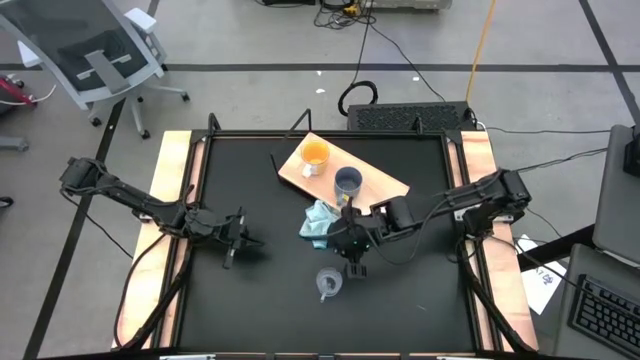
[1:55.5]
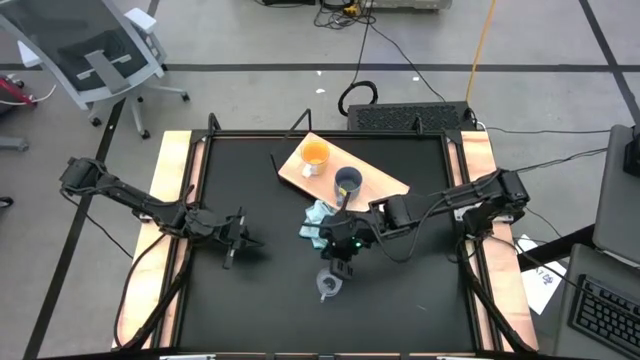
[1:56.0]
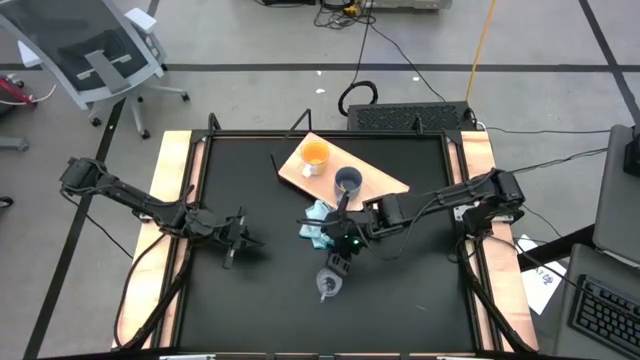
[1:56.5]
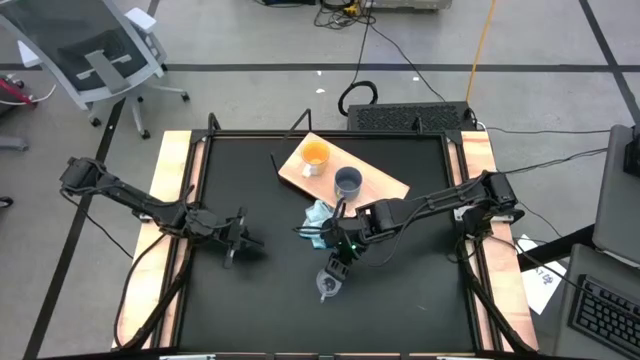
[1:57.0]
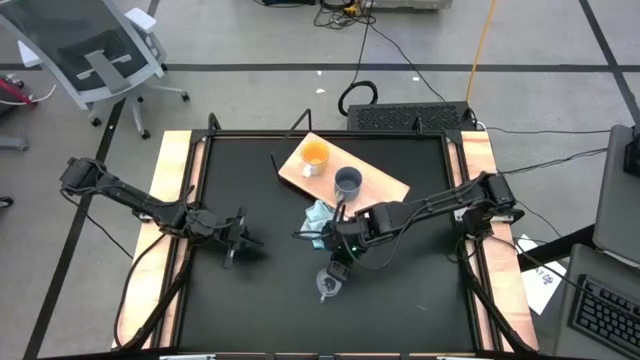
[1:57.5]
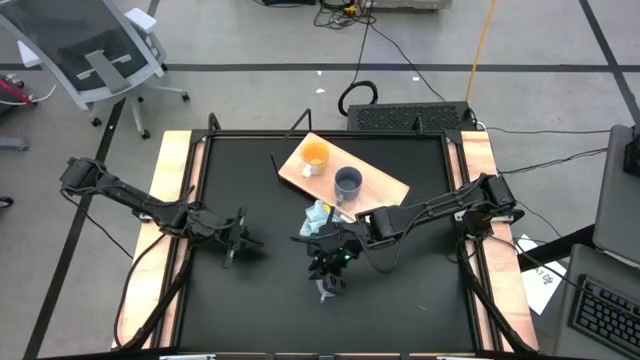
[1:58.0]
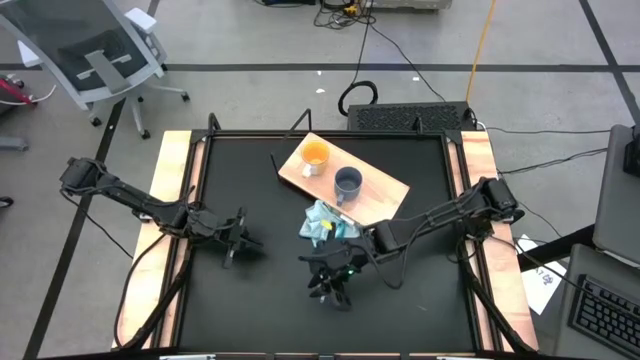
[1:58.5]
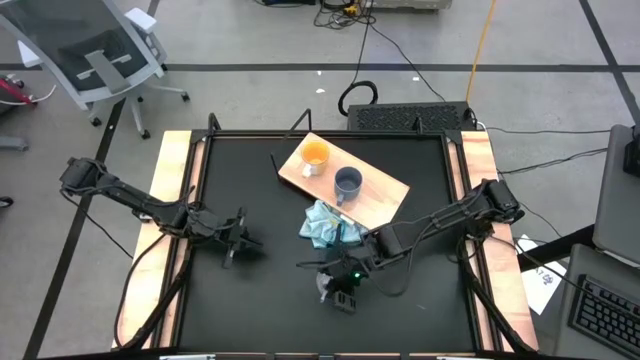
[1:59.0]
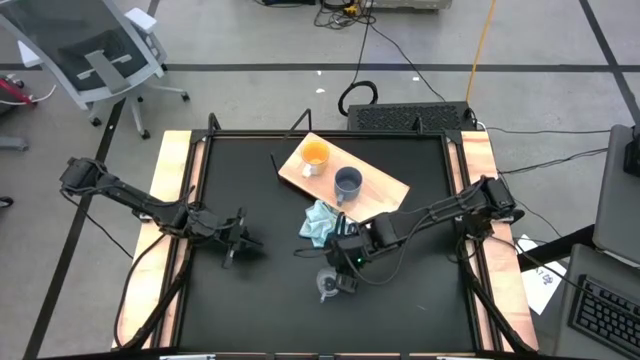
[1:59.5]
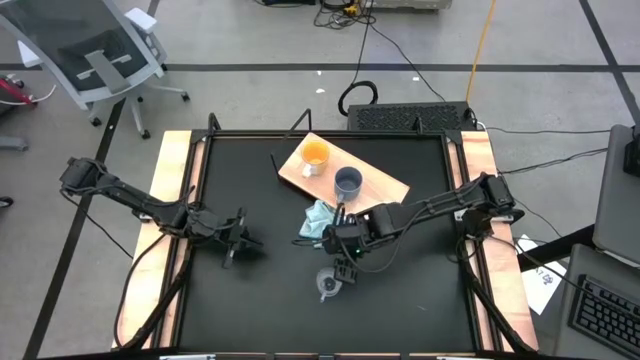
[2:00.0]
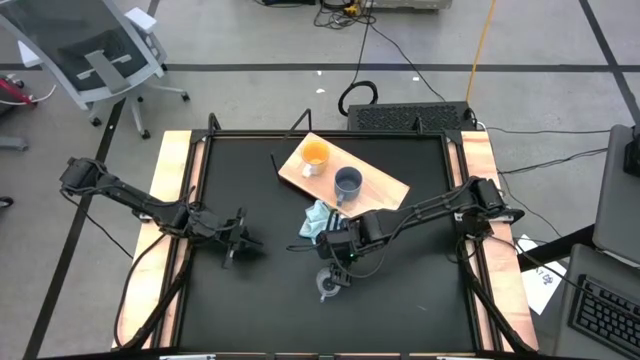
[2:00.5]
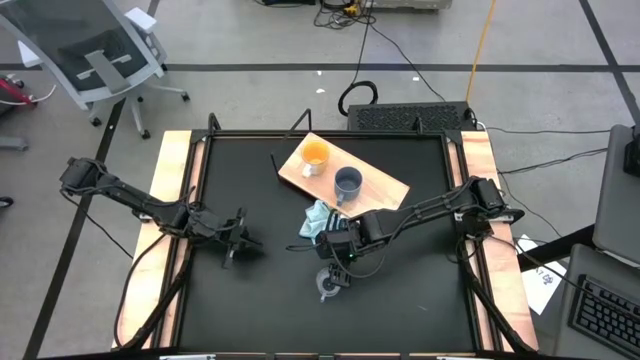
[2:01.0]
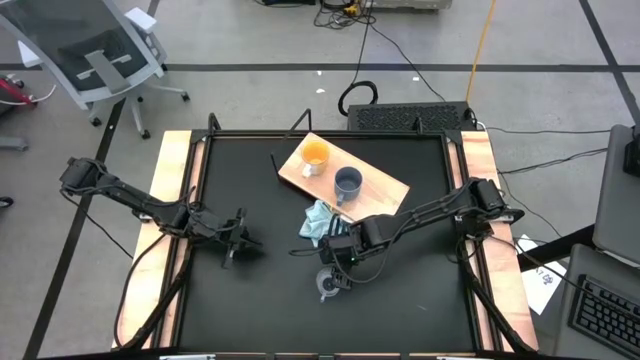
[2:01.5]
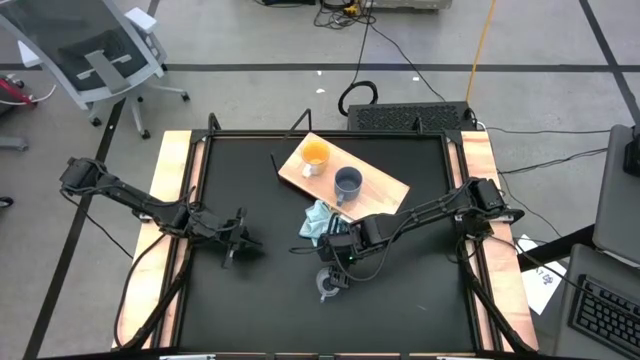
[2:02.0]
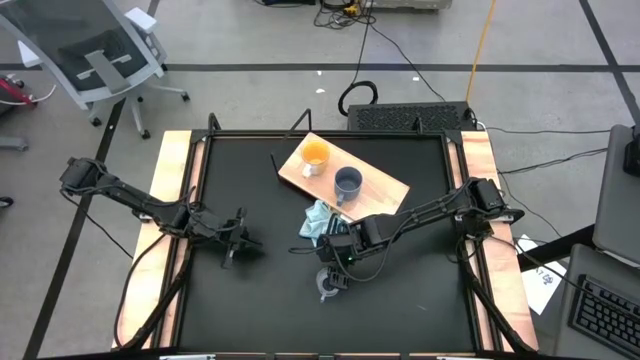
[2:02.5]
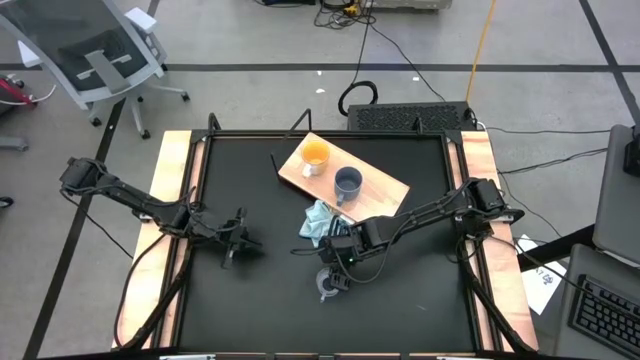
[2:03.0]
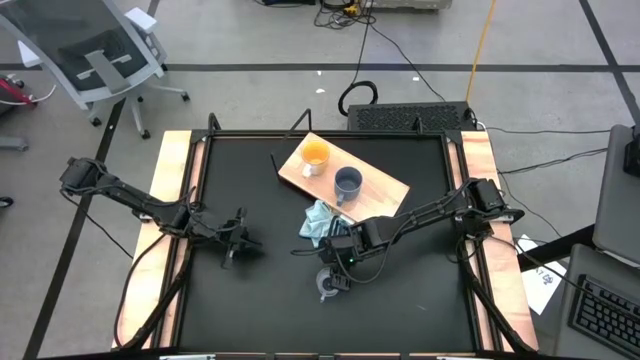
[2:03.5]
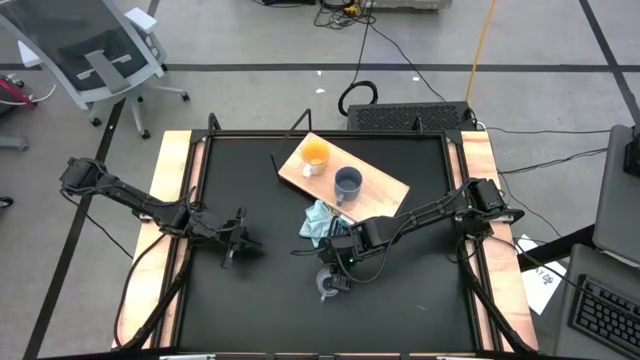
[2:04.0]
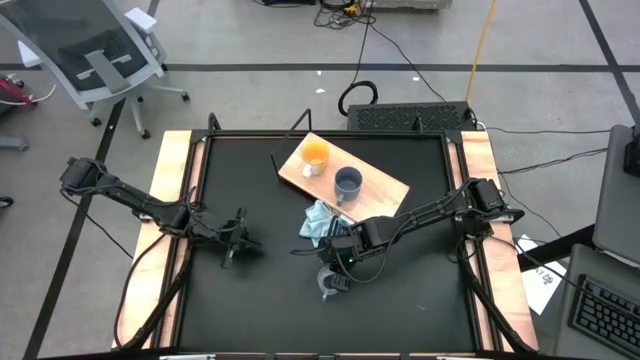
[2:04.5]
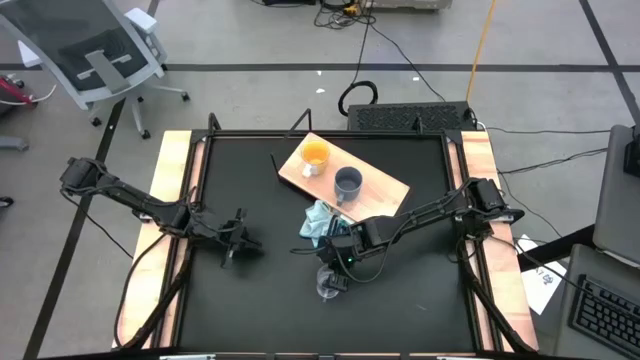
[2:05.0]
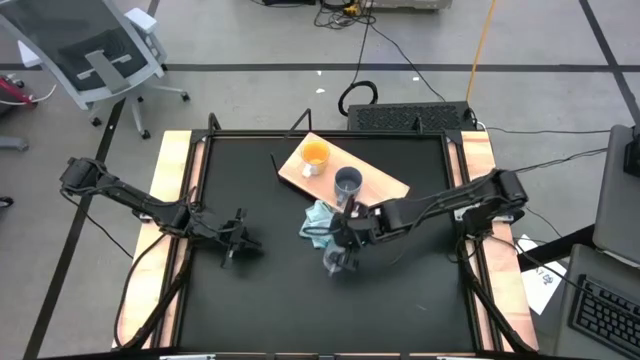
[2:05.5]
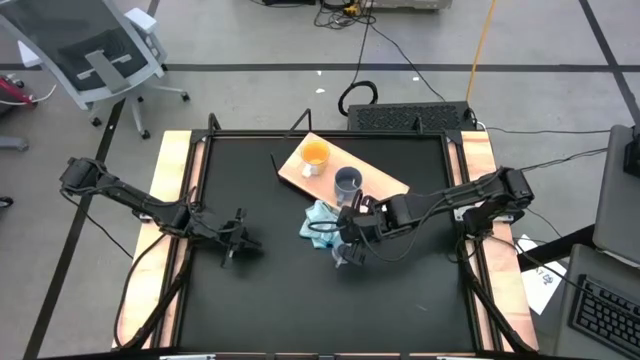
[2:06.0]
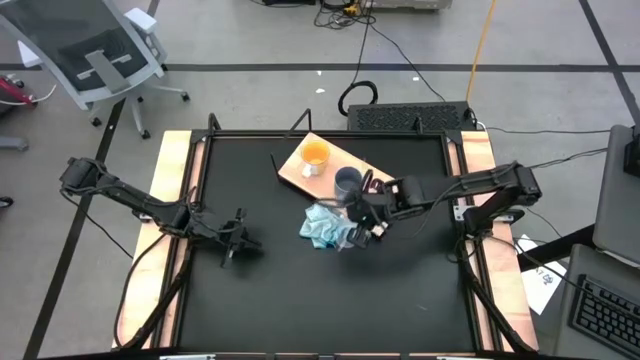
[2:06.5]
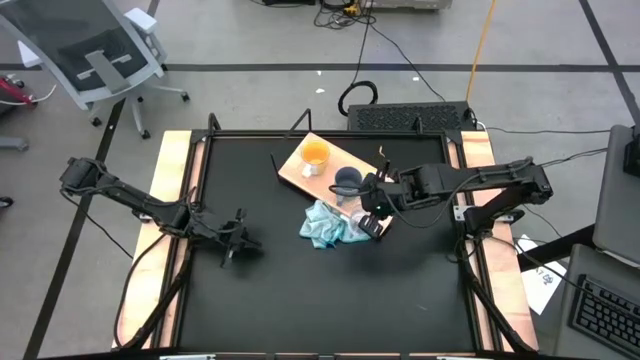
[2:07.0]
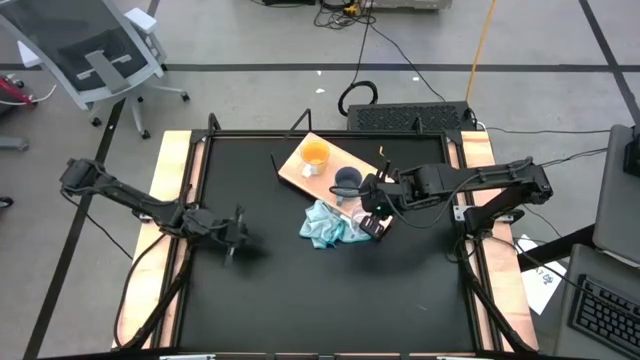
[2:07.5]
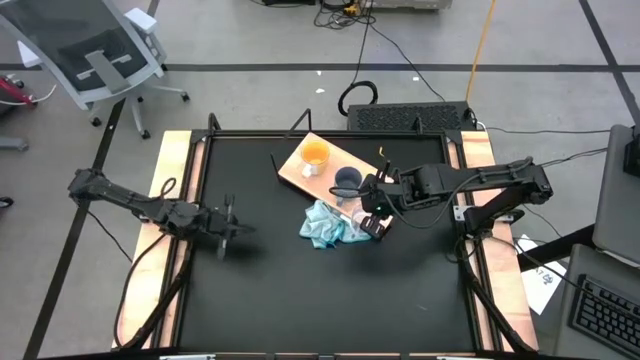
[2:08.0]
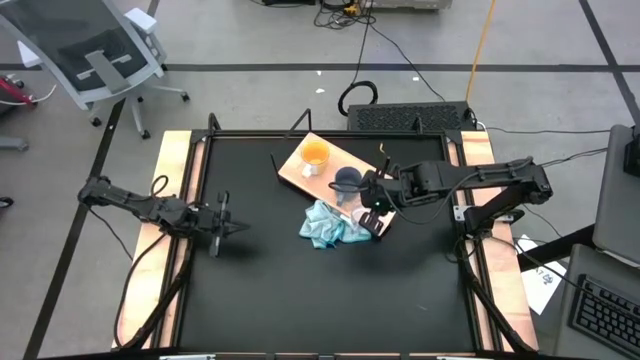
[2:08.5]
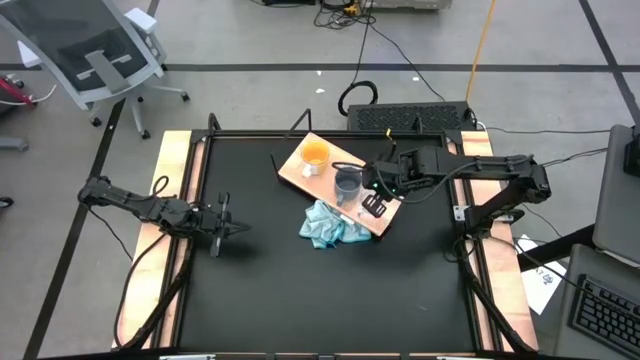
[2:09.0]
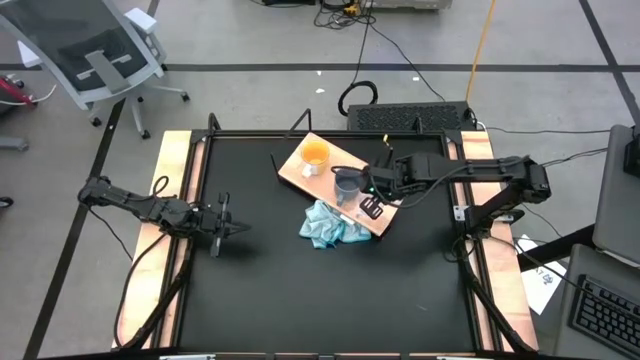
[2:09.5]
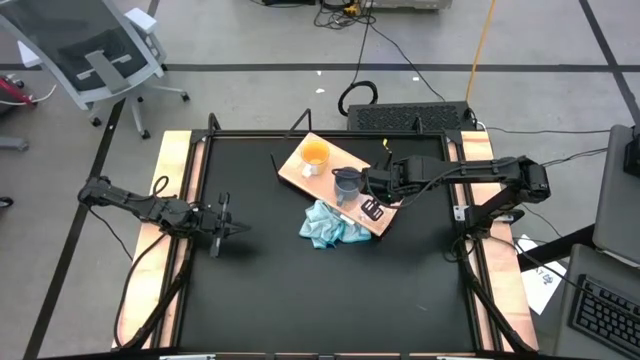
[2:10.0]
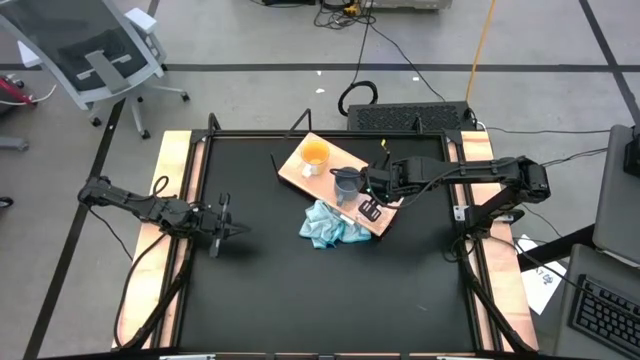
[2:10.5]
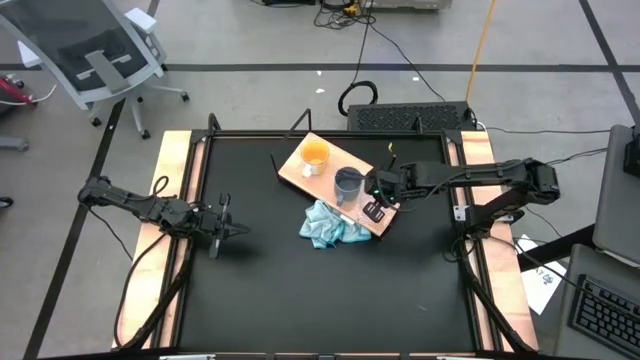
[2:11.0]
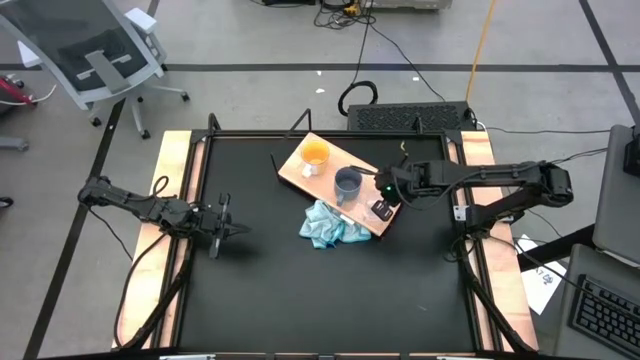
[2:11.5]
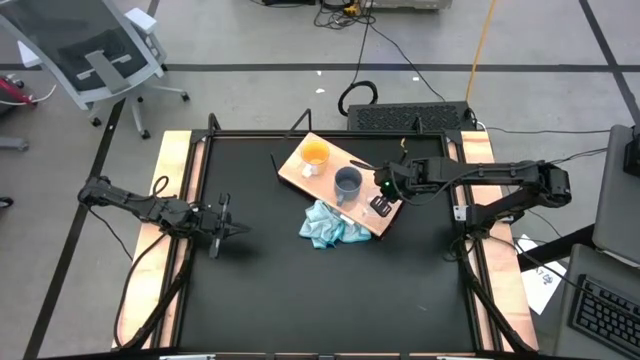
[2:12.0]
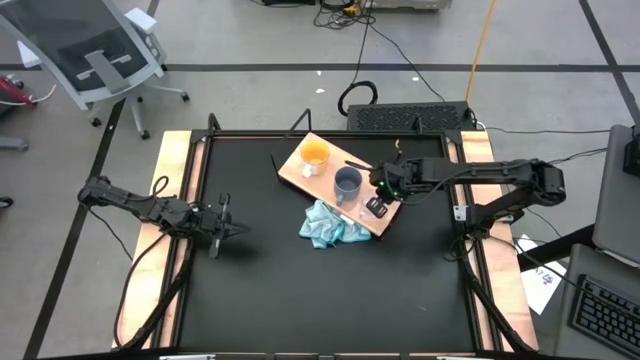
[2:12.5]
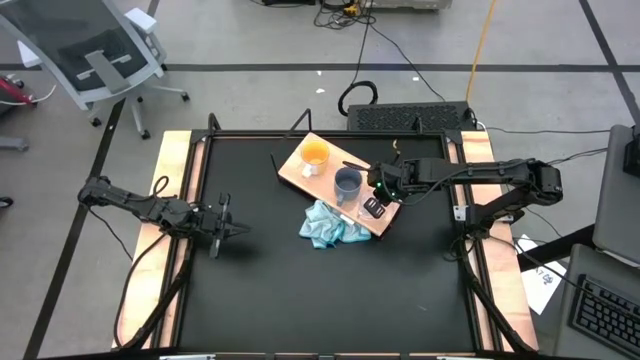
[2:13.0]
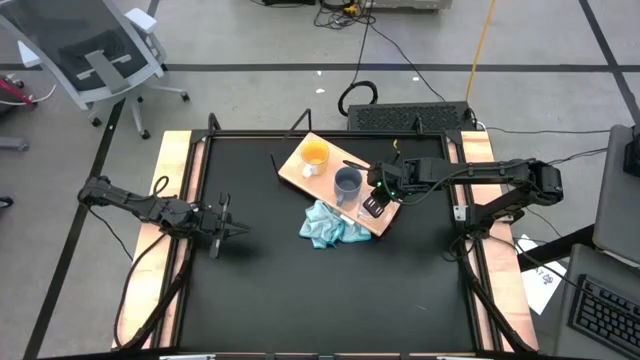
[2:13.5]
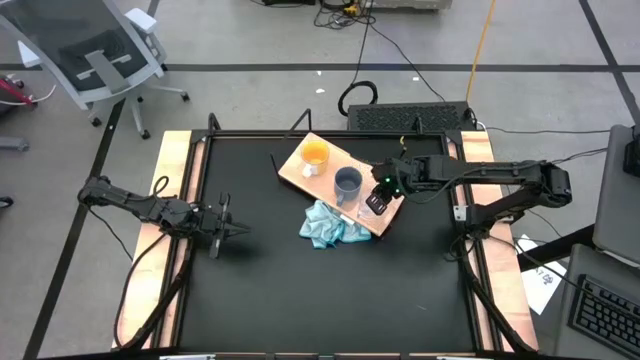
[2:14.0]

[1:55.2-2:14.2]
Task: Stack small to large cups/mugs on shelf
Put the transparent mug on the shelf
